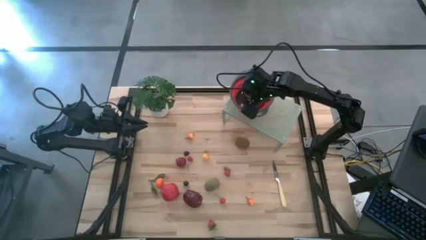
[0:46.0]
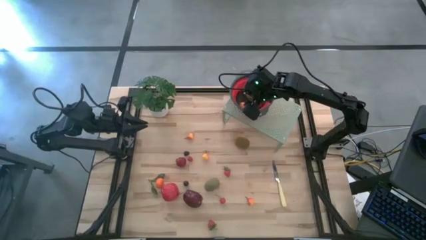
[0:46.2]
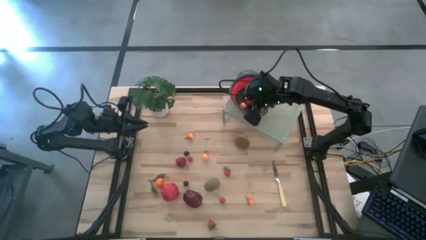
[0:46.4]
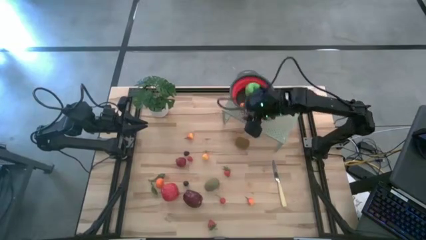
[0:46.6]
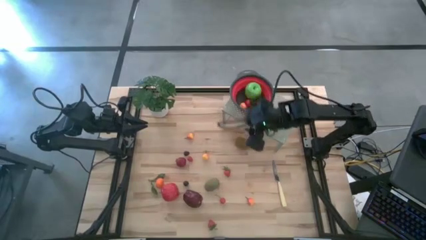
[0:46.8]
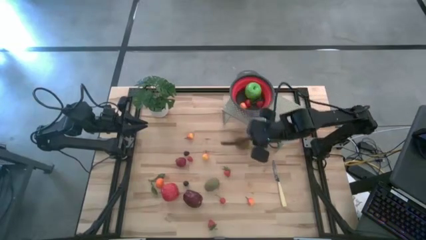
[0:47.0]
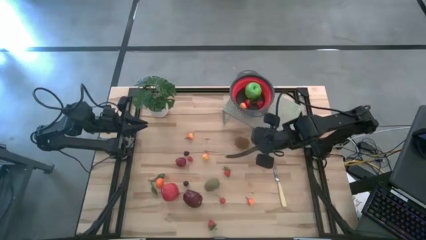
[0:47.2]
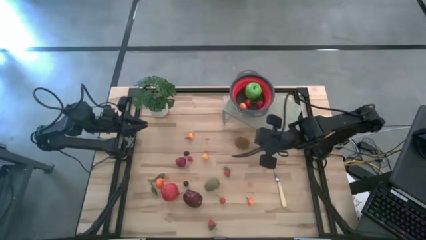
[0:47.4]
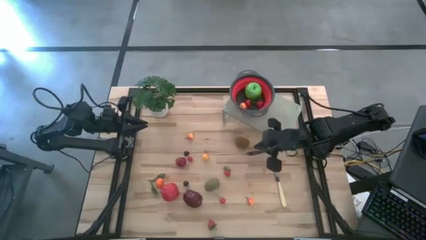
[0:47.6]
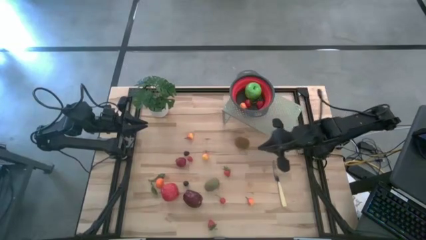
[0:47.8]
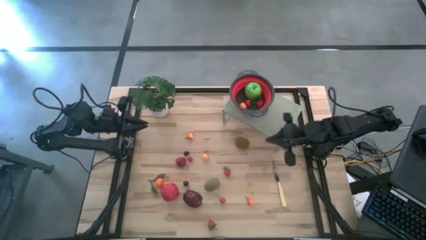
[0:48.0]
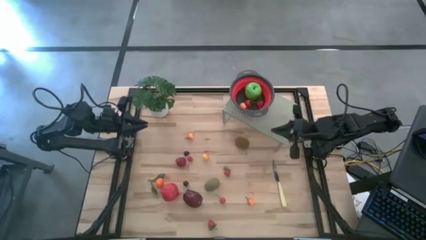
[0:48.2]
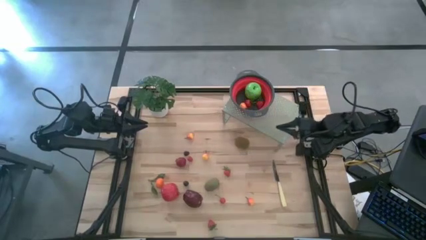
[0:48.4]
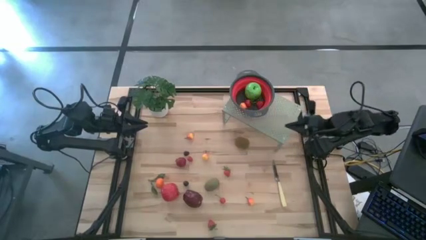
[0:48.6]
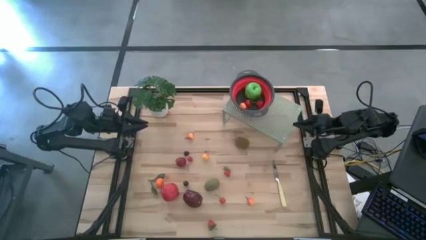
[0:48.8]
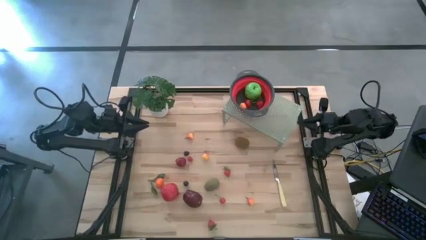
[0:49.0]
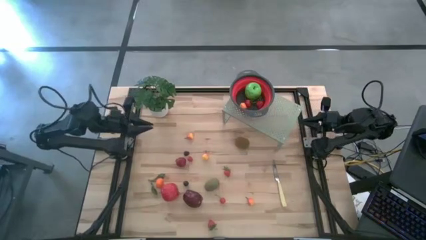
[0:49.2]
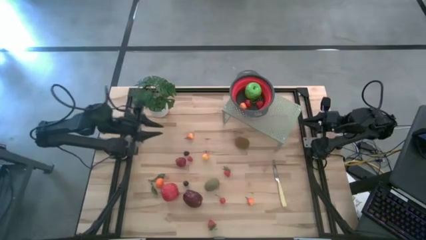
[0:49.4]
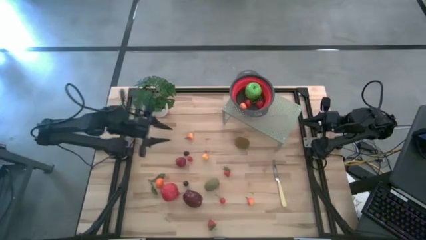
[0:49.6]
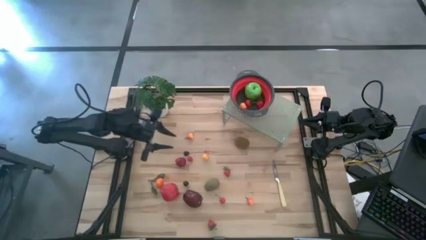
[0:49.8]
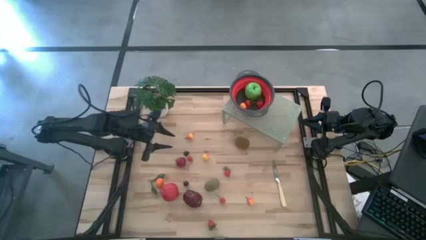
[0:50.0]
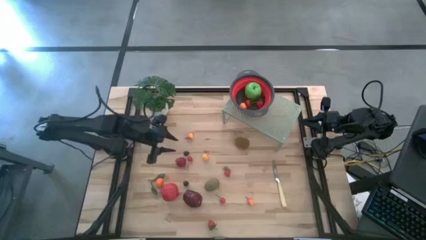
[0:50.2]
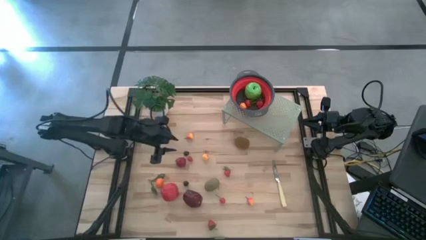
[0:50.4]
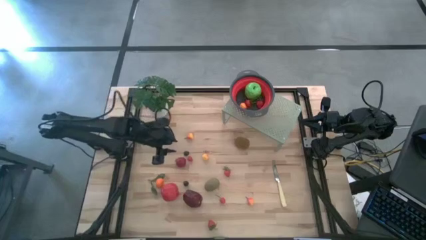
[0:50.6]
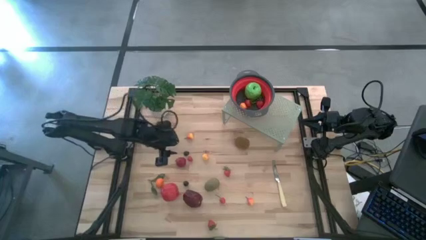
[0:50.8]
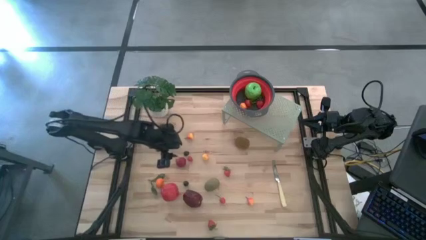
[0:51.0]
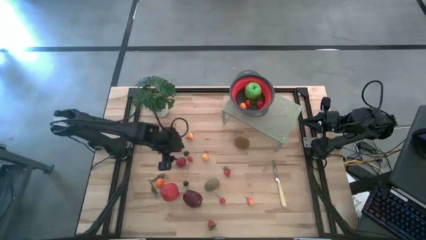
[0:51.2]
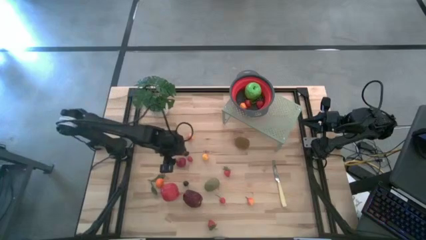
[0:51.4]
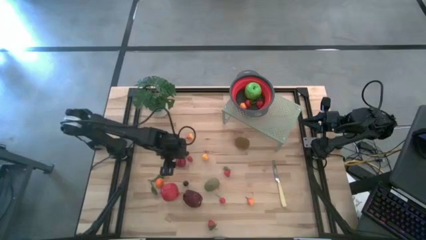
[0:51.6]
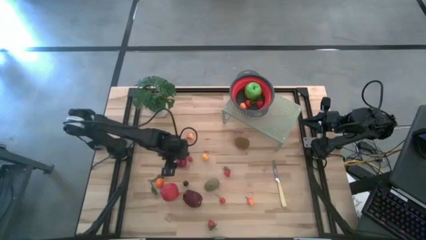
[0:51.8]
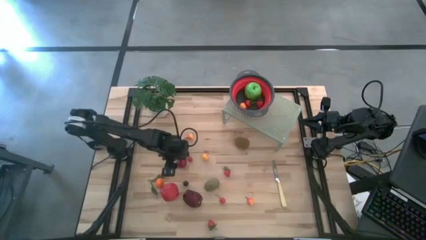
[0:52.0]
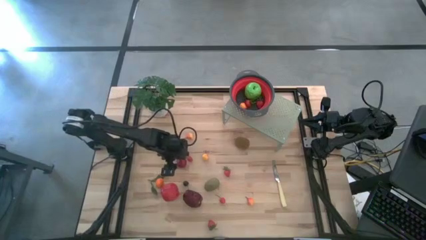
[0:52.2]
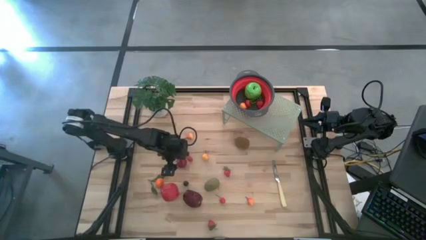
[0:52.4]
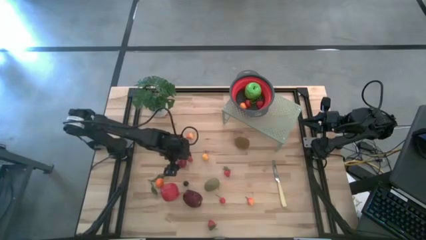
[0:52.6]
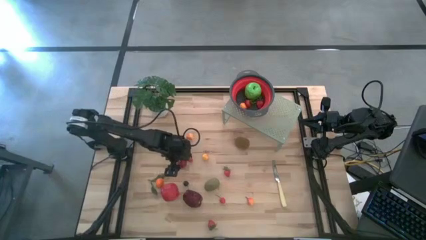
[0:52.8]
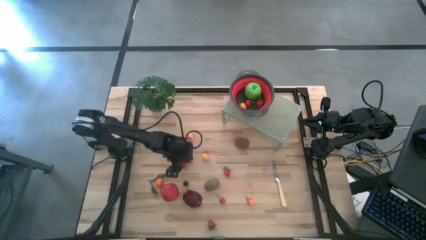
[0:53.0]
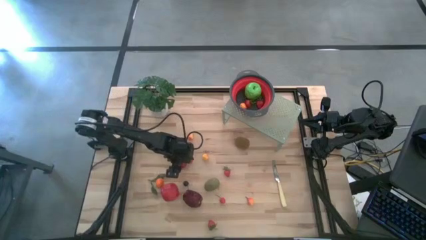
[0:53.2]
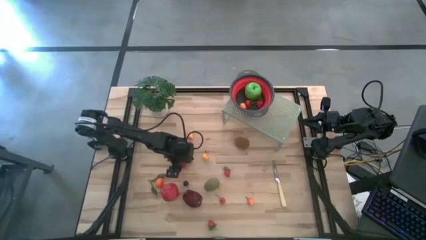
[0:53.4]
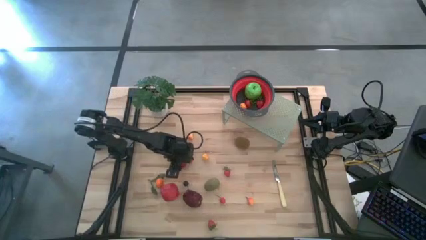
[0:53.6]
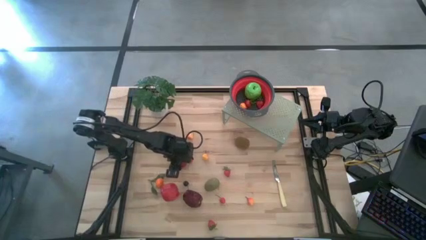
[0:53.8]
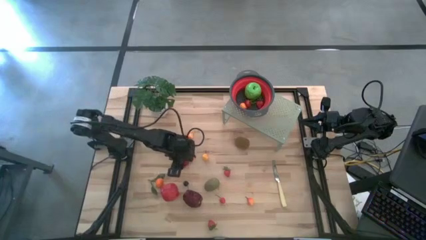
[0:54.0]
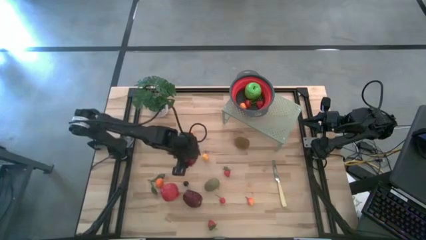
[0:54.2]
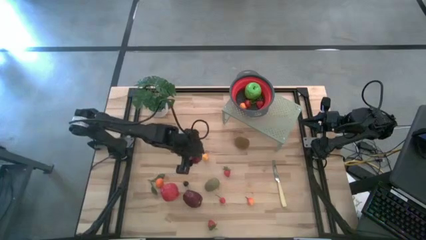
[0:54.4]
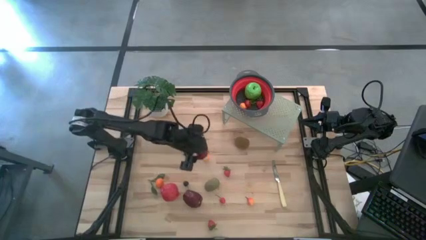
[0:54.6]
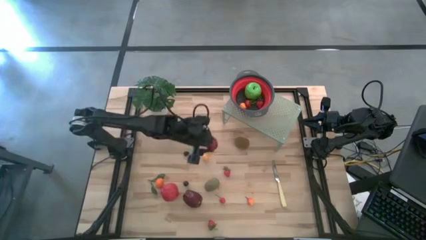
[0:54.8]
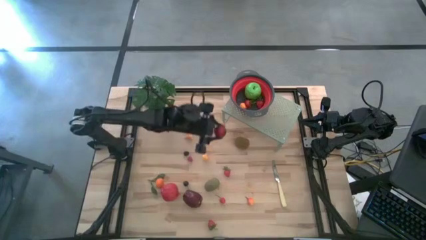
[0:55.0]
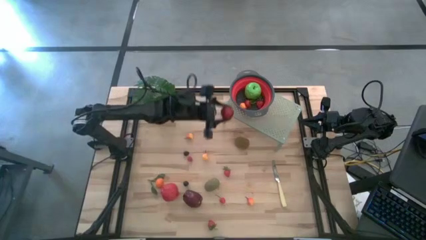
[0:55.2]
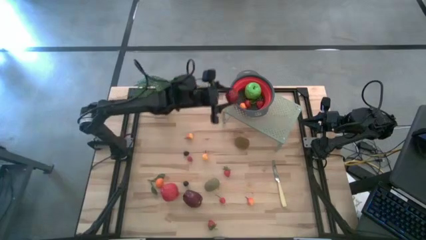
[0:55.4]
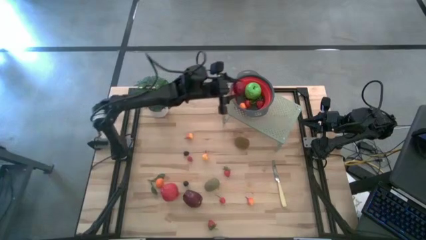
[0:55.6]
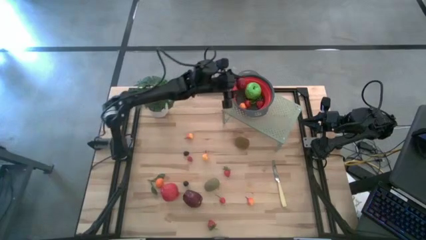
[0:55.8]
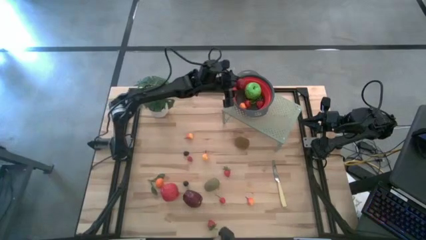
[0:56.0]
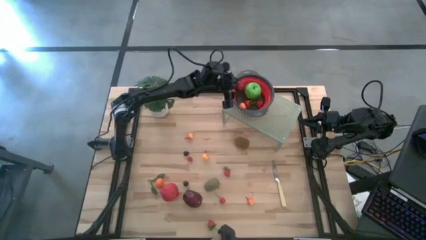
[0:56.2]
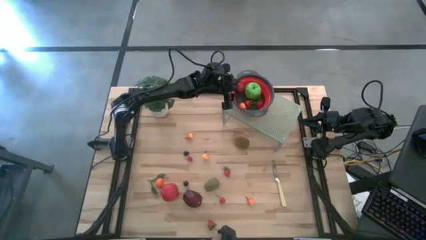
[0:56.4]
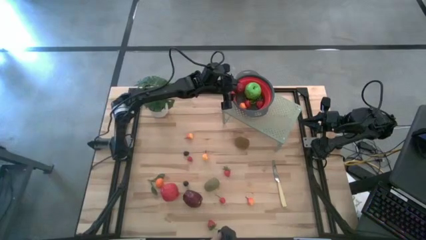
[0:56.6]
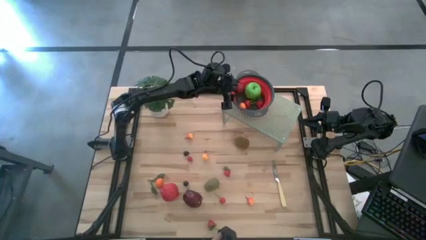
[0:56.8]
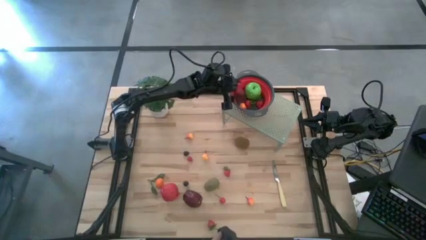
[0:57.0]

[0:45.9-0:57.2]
Task: Pick & Place Fruit
Put the red pomegranate into the red strainer bowl
